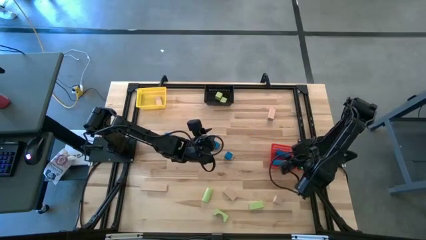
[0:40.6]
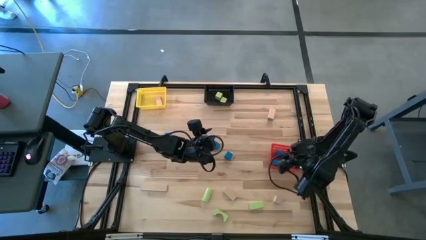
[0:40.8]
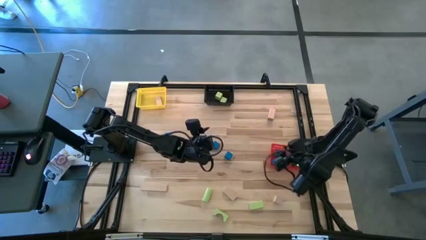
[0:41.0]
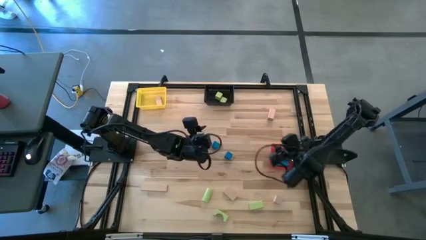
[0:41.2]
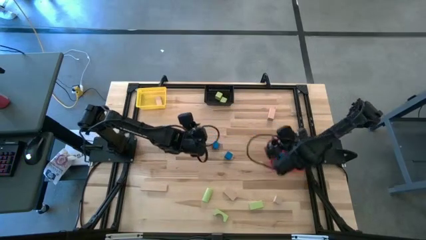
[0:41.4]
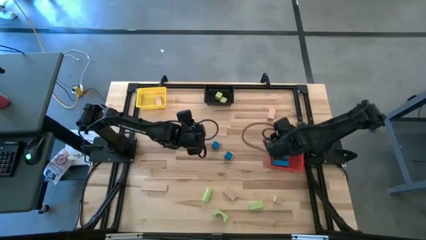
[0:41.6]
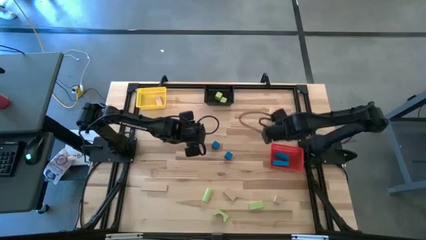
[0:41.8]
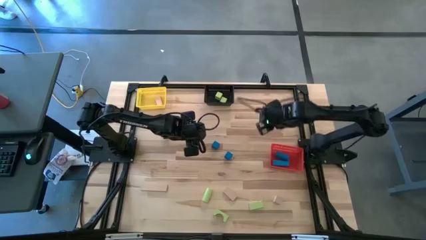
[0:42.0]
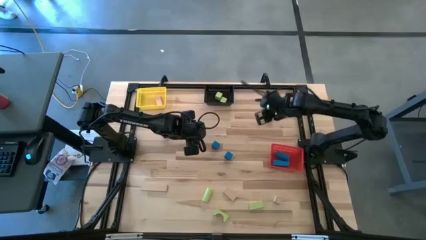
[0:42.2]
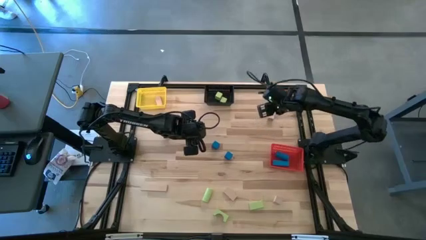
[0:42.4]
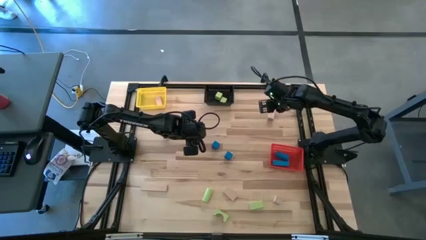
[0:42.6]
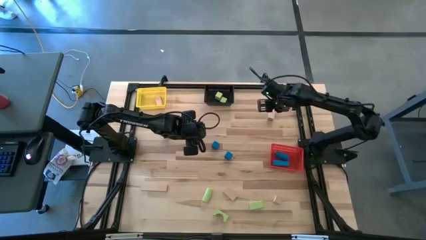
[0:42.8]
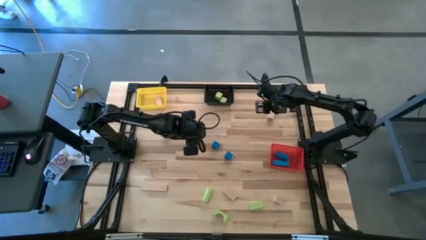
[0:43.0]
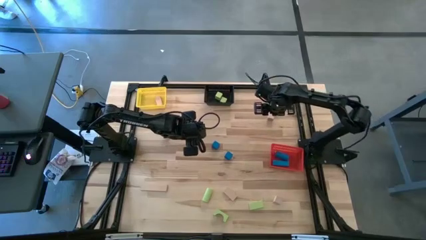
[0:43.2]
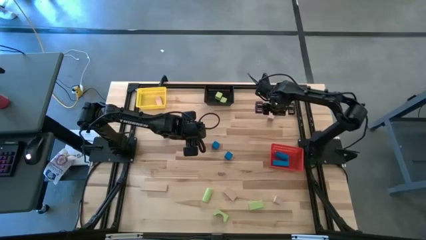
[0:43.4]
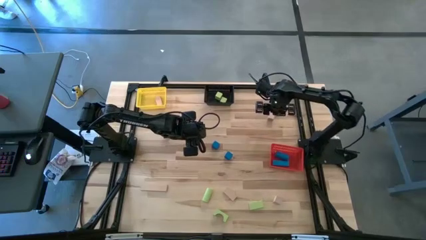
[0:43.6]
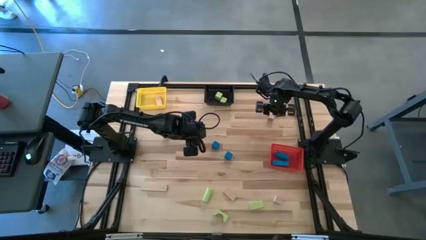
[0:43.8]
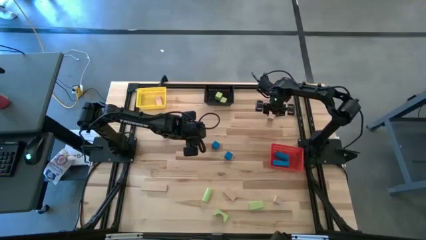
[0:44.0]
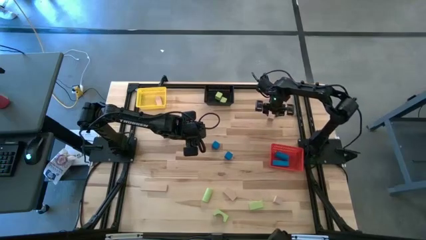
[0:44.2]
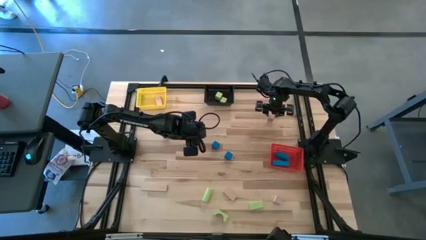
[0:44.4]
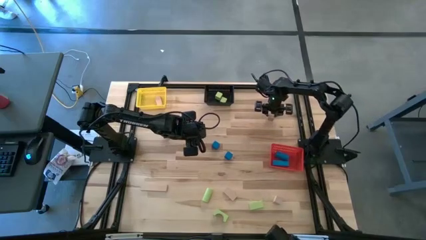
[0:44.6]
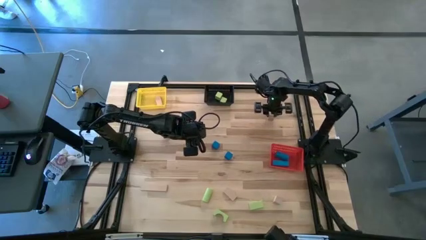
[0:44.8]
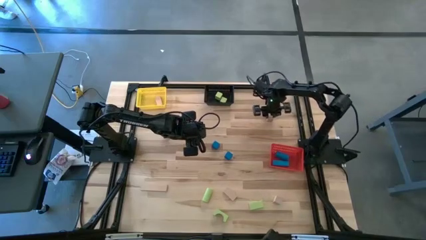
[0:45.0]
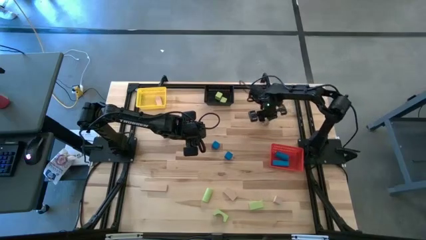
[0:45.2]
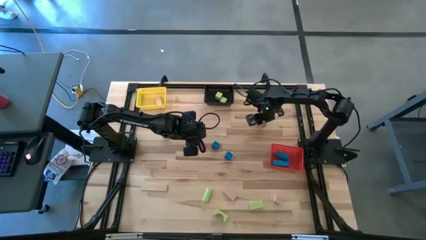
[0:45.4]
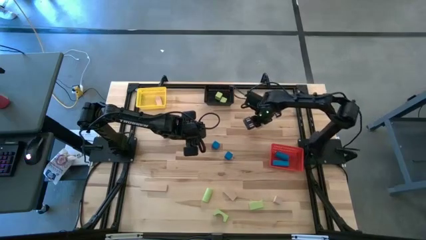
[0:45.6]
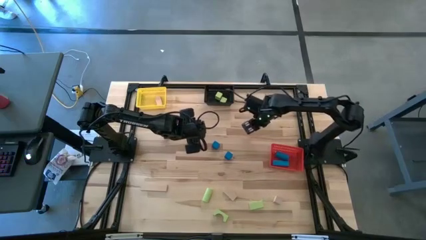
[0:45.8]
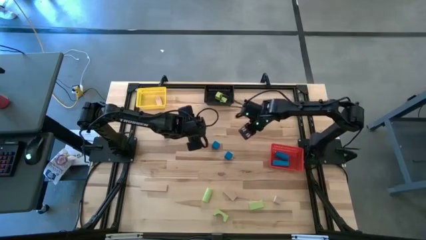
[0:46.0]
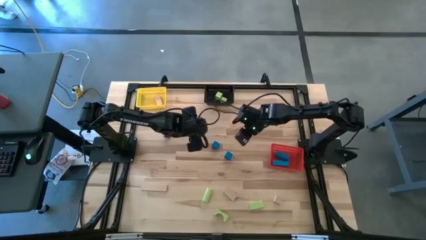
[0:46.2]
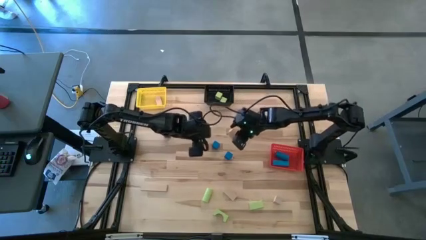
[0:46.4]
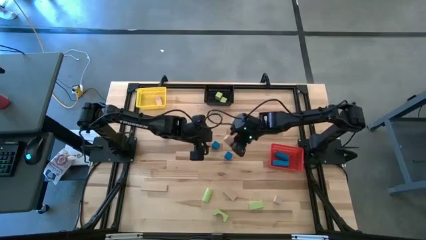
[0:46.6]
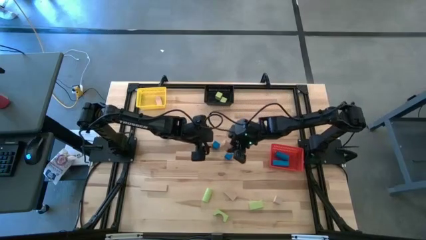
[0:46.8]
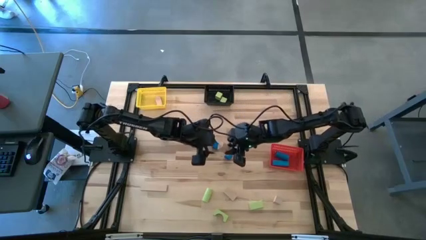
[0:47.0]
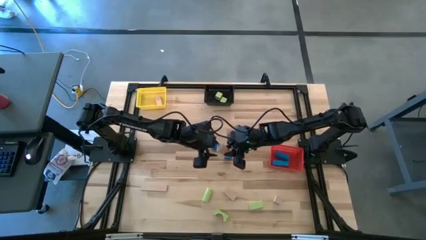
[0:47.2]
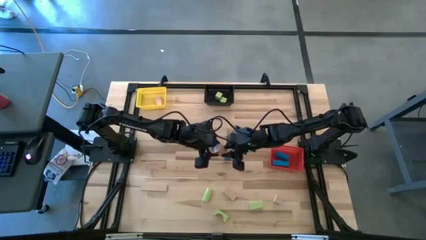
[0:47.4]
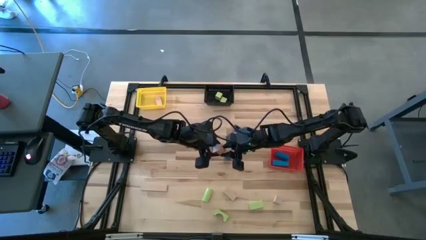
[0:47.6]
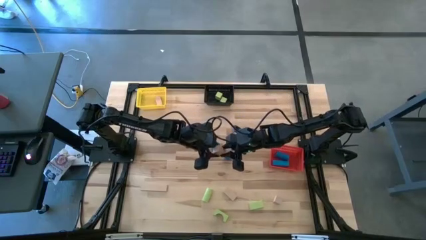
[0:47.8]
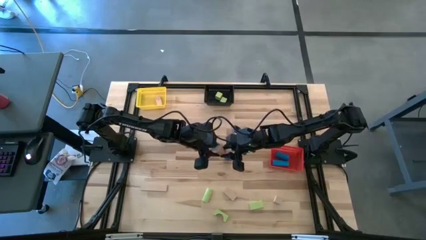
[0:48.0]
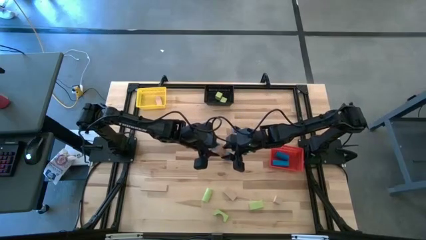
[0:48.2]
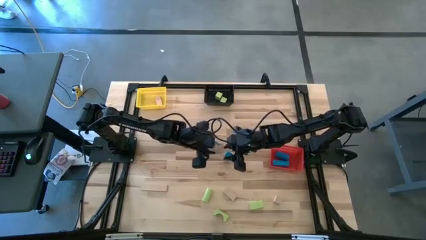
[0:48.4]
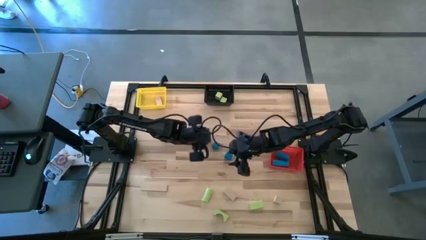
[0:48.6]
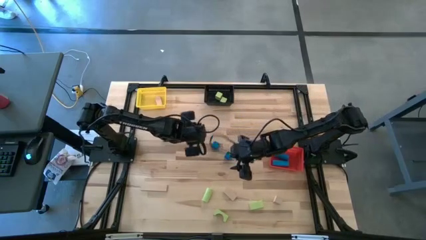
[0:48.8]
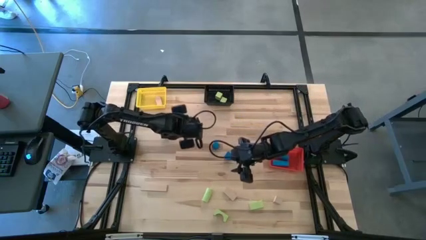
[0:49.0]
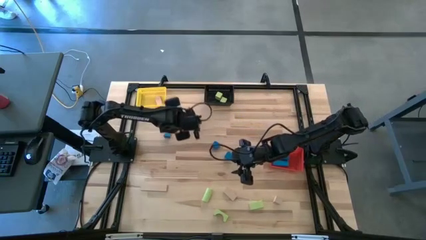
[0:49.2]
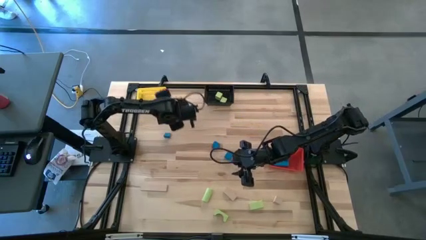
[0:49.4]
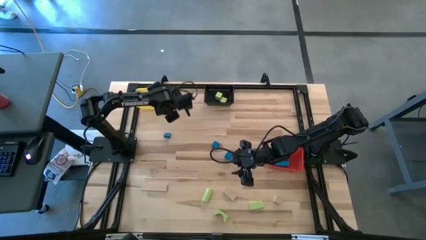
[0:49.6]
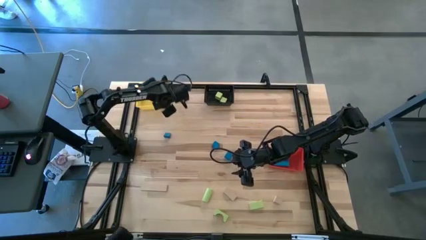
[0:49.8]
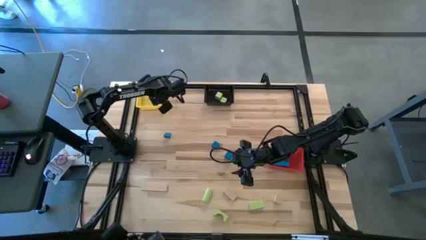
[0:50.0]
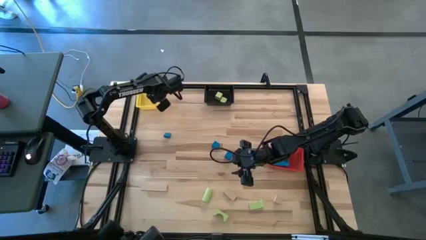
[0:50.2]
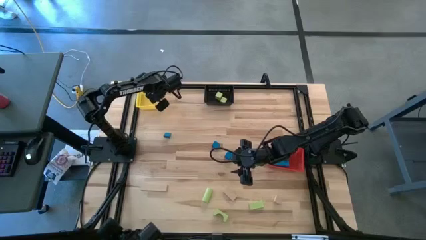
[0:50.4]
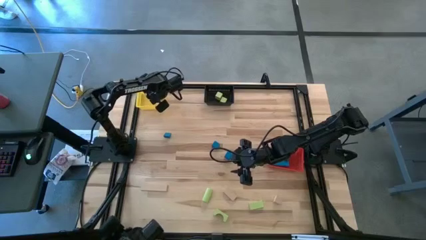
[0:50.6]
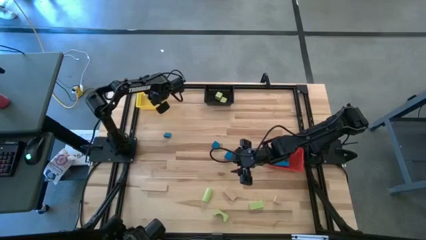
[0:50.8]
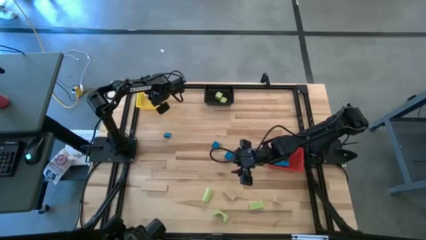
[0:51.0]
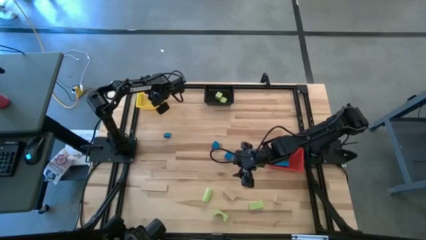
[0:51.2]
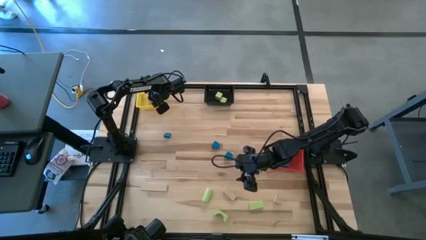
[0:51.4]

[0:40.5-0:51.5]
Task: Sort & place blocks by color
Put the brown block into the yellow basket

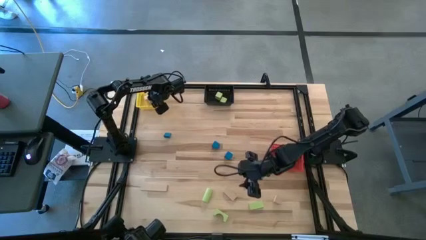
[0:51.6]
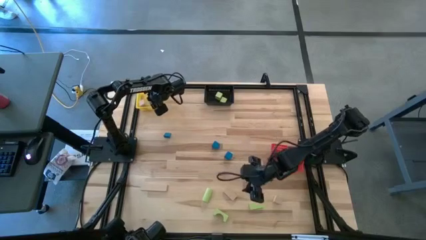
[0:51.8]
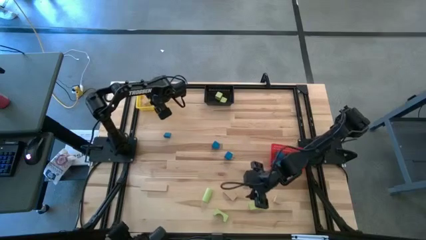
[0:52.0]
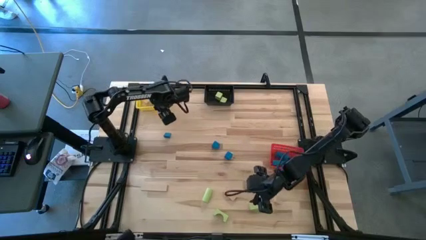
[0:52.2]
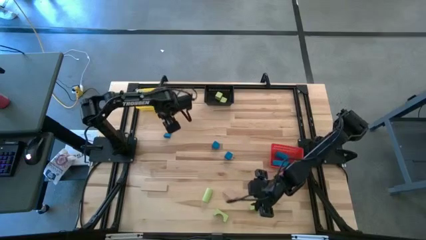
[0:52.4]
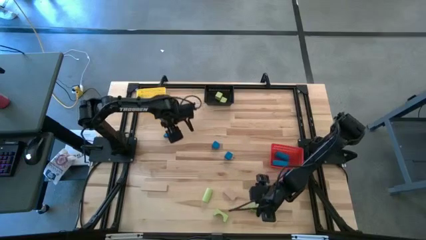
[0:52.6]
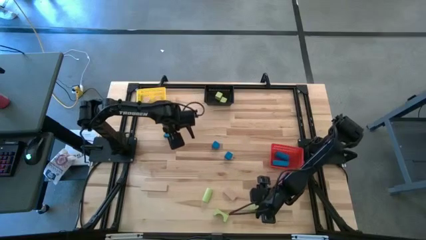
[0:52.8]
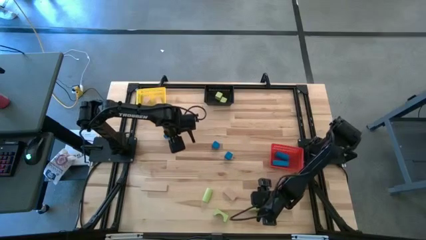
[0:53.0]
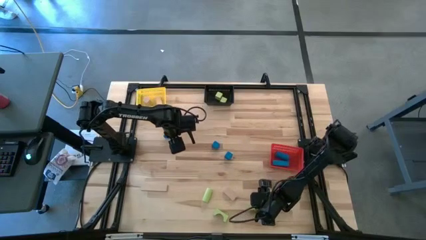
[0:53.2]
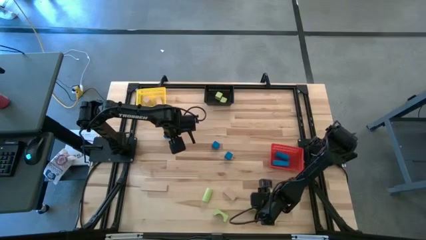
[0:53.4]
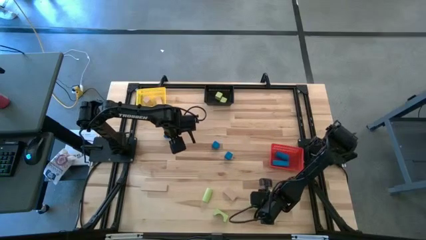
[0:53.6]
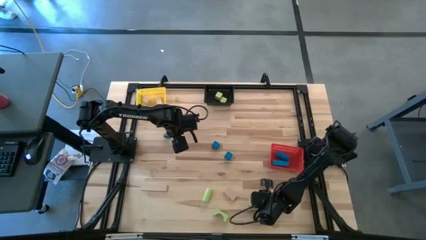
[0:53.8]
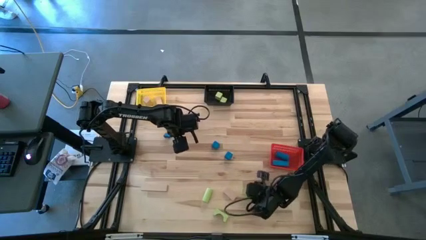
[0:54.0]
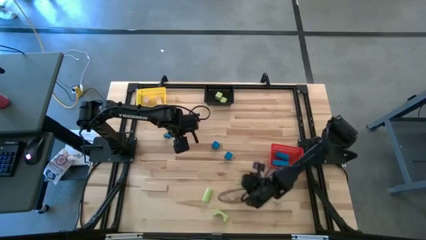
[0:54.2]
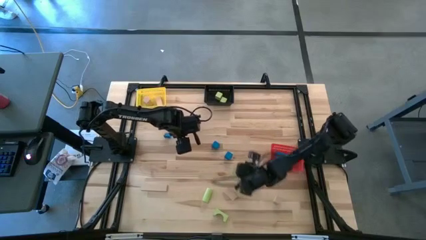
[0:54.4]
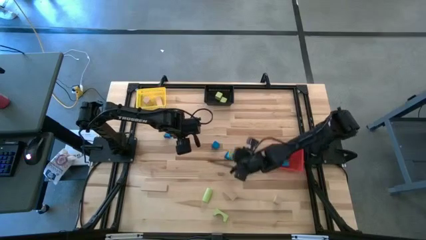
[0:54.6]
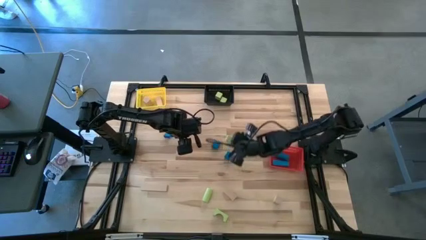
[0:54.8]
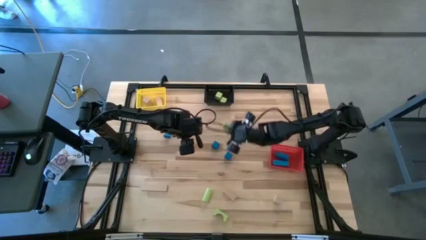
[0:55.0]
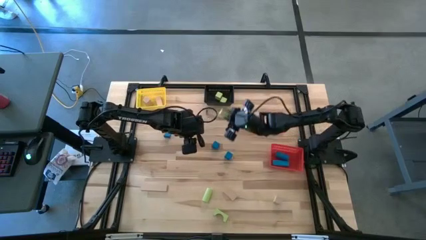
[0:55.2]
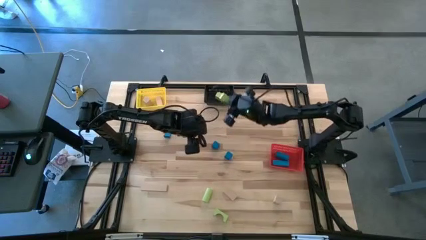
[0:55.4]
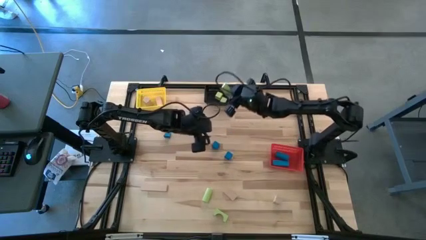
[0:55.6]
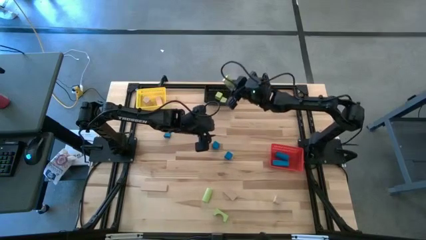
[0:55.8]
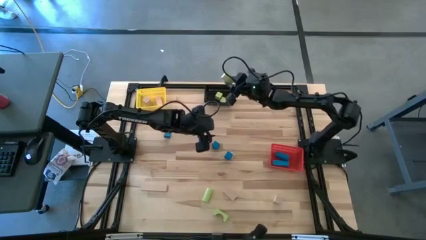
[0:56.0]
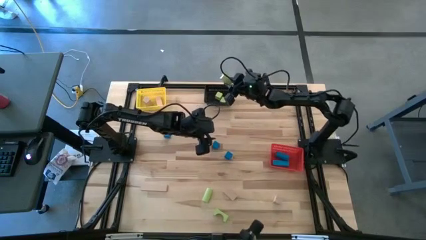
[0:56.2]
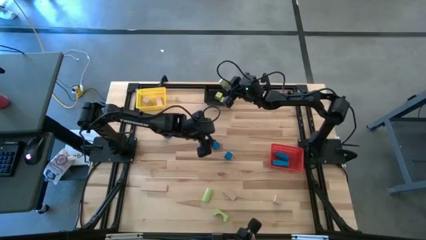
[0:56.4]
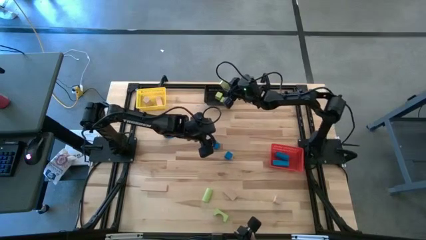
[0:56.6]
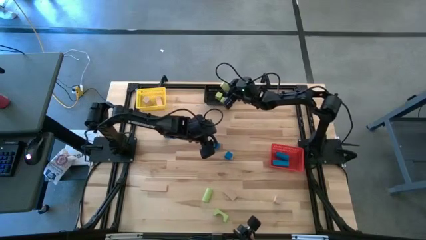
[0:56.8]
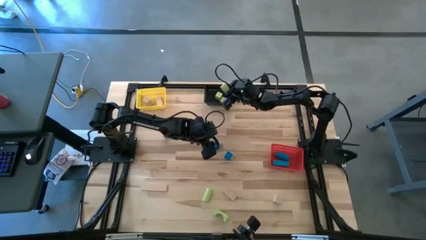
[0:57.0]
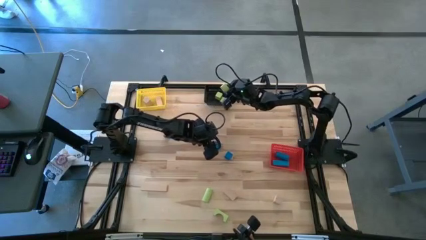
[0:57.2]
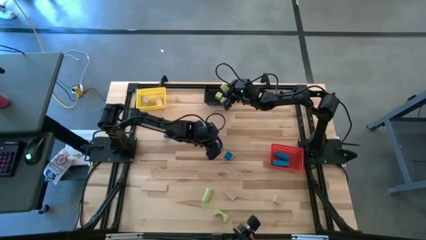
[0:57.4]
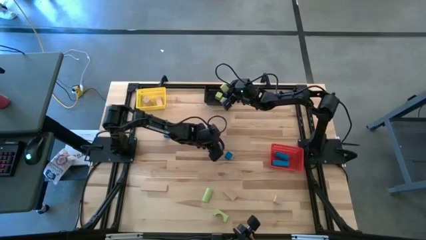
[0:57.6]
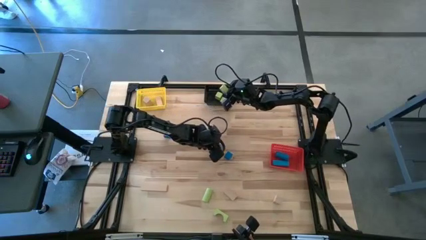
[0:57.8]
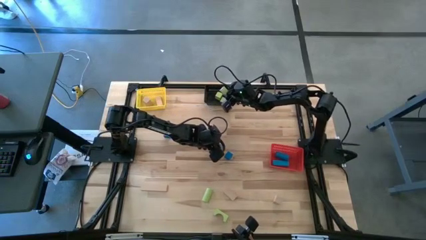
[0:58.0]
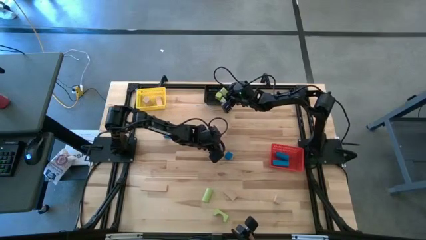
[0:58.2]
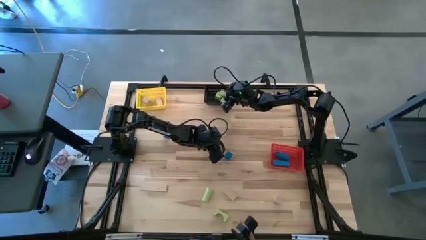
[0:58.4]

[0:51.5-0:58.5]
Put the green block into the black basket
